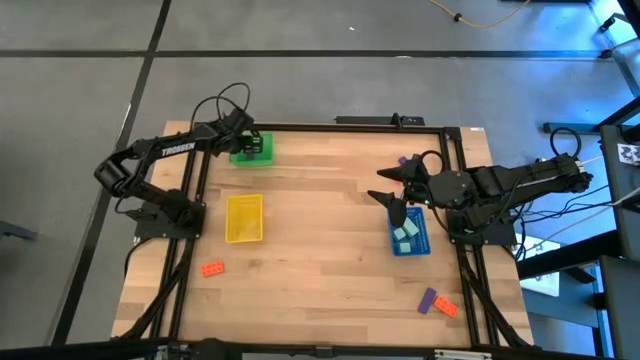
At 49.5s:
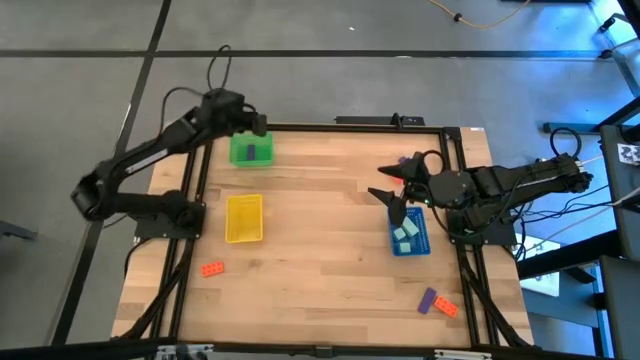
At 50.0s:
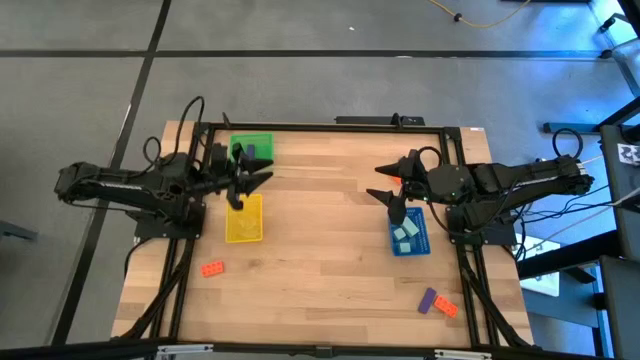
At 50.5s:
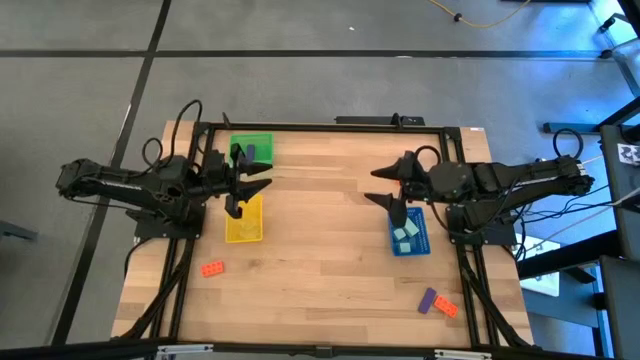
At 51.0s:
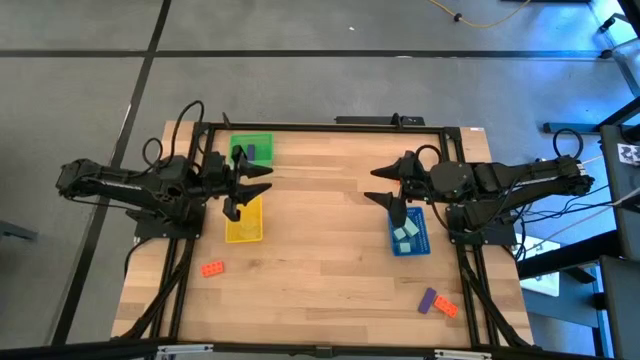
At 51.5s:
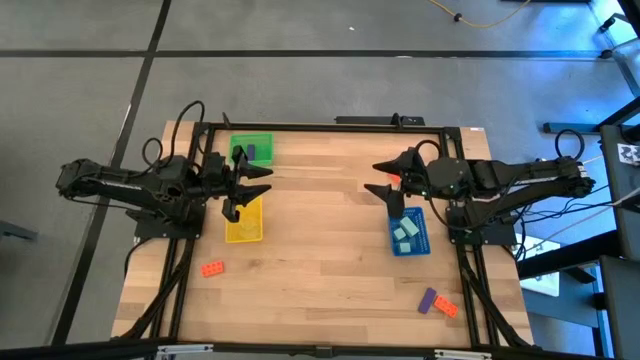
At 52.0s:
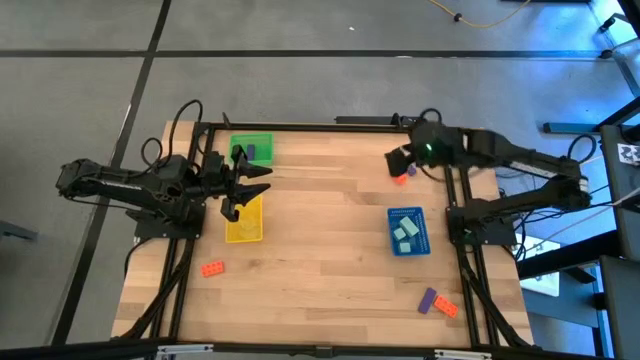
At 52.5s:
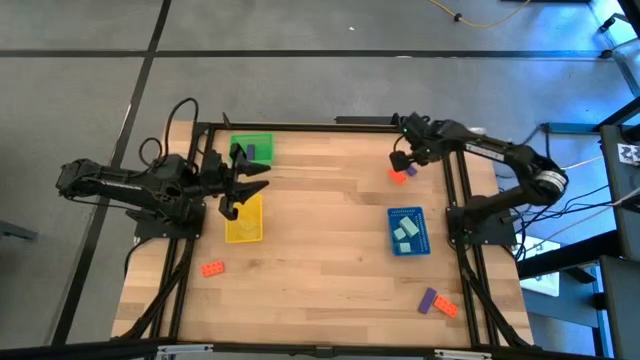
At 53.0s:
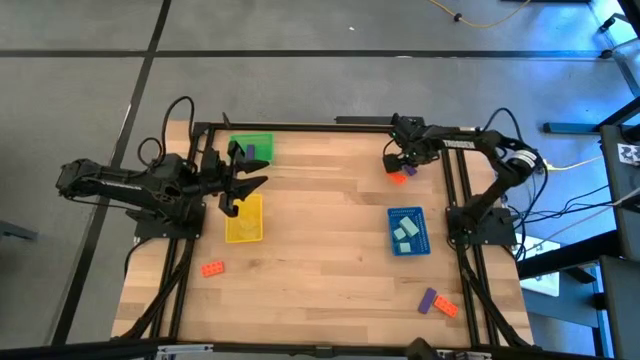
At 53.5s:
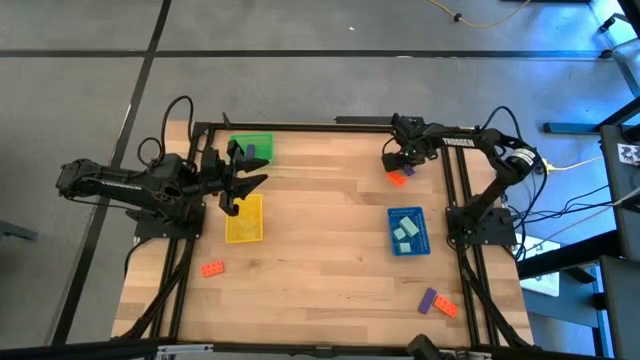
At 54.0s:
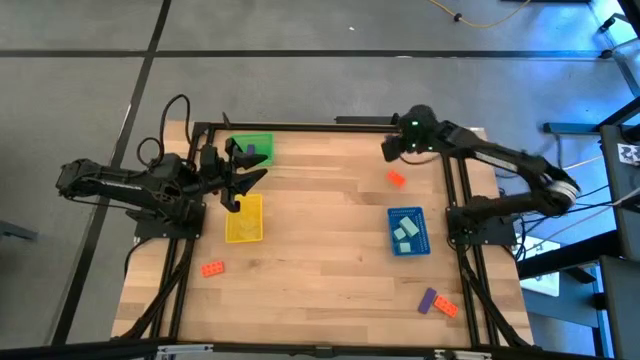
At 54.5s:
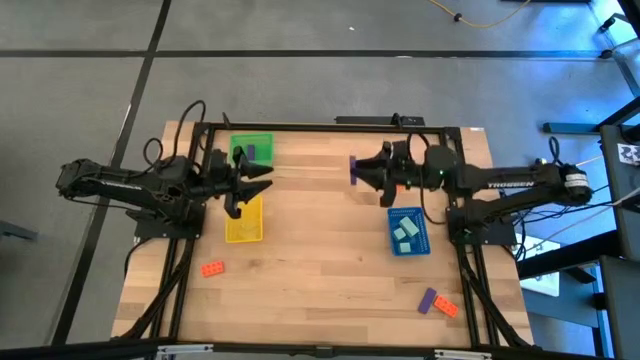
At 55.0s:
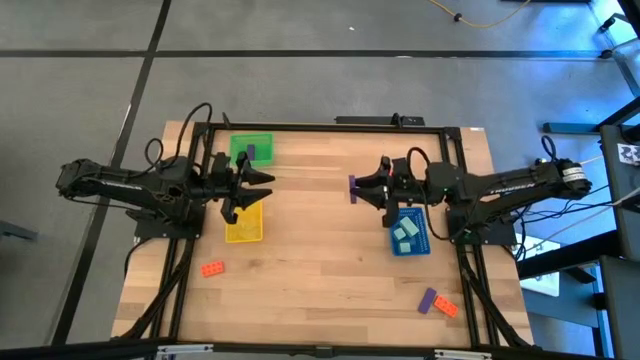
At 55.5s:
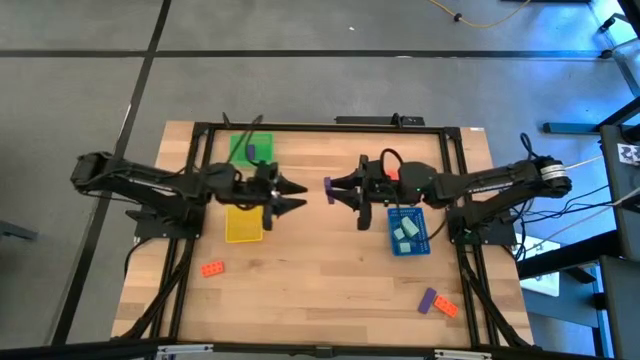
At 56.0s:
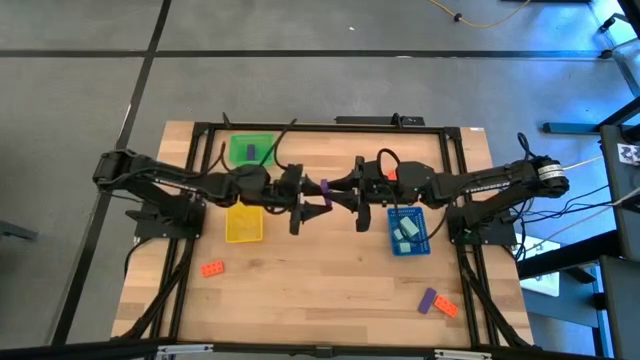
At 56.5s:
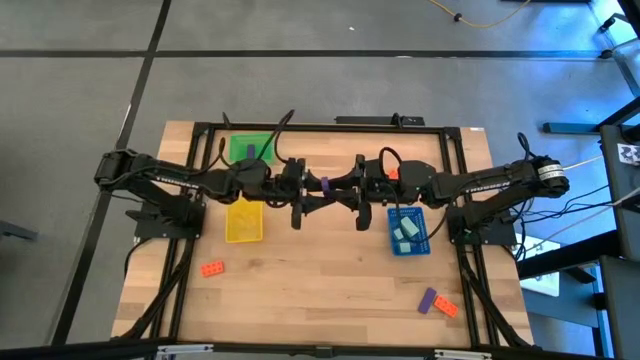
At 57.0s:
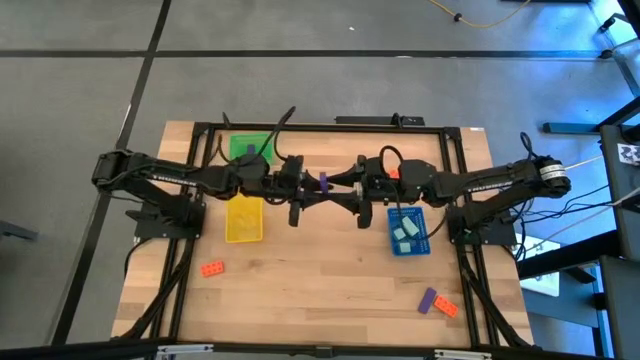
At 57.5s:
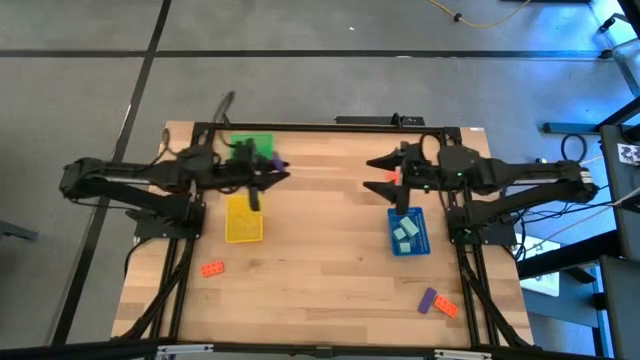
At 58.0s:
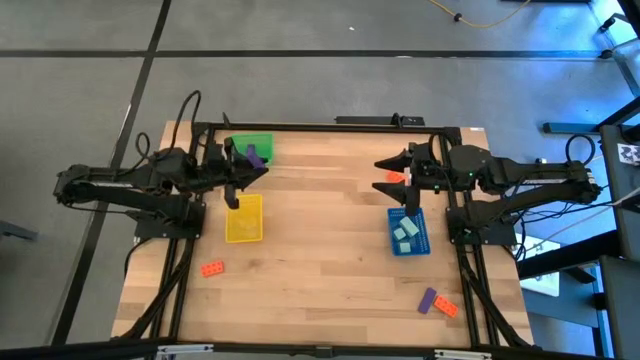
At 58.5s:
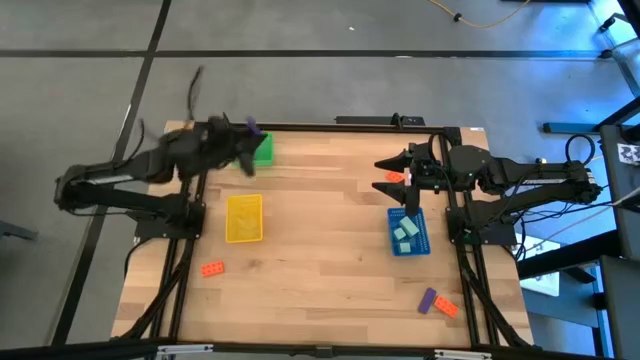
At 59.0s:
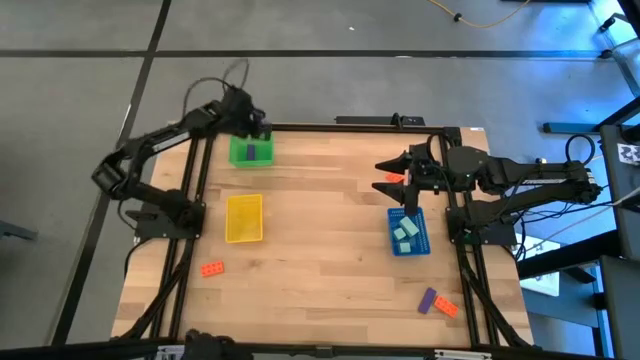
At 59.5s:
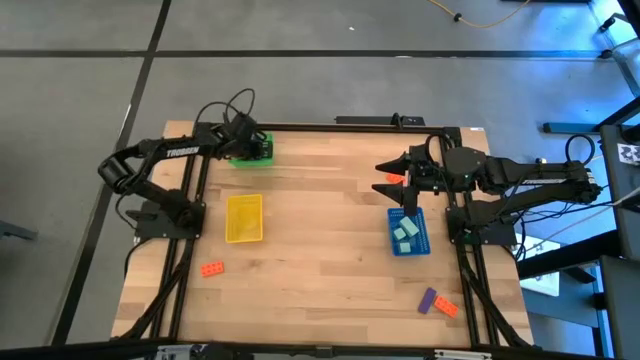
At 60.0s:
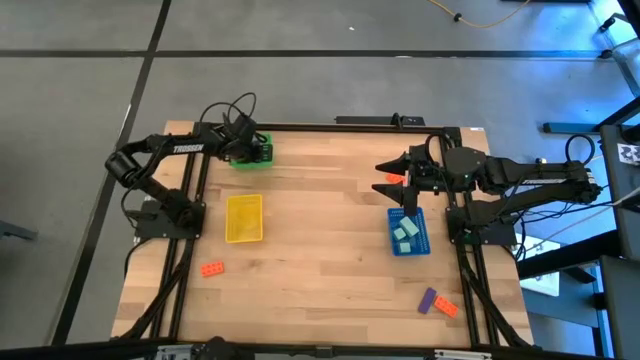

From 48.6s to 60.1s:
Task: Sort & place blocks by color
Put the top violet block into the green bin

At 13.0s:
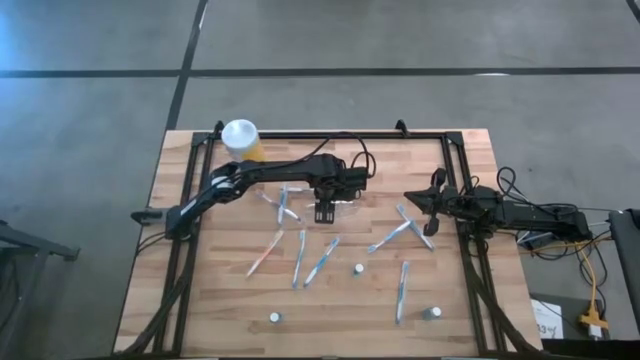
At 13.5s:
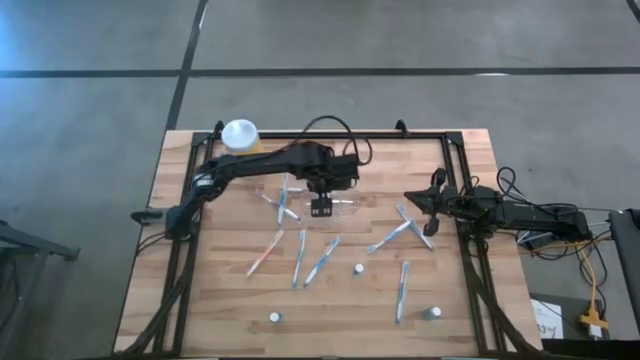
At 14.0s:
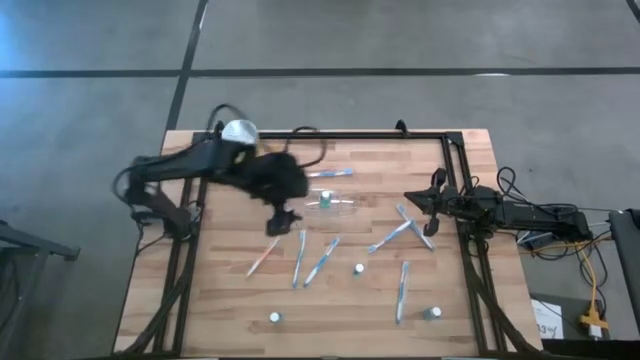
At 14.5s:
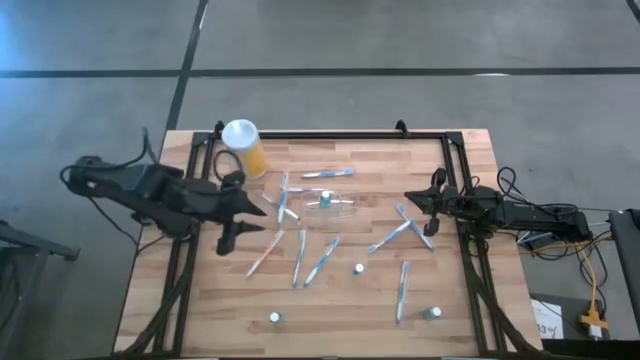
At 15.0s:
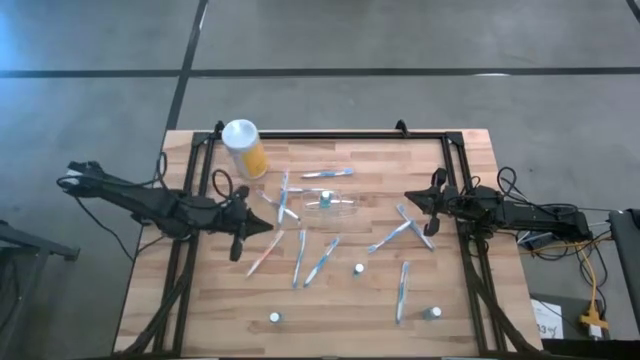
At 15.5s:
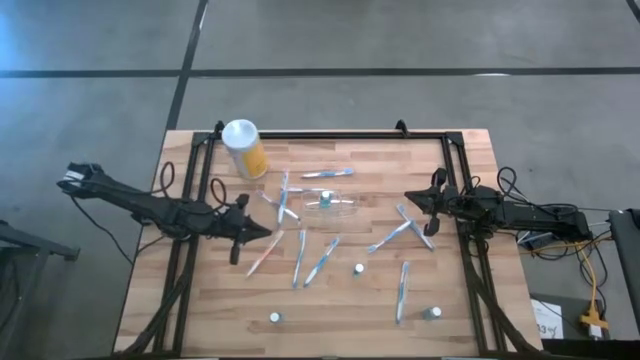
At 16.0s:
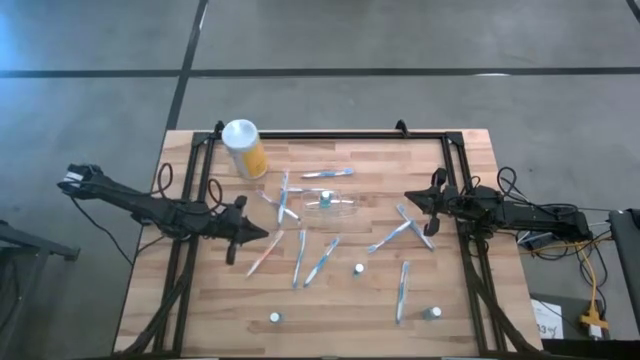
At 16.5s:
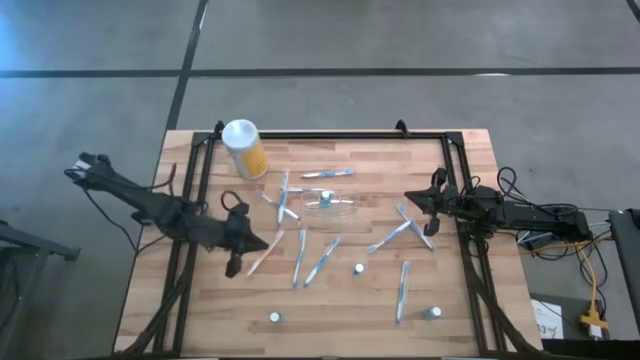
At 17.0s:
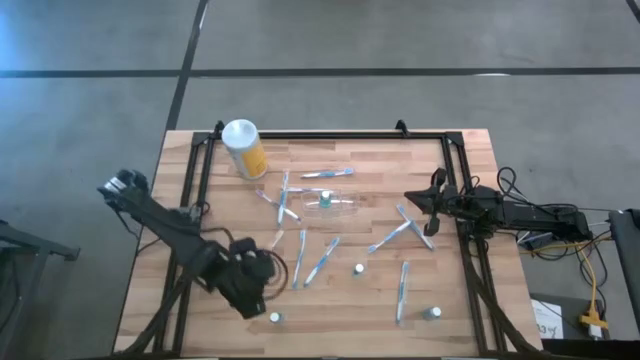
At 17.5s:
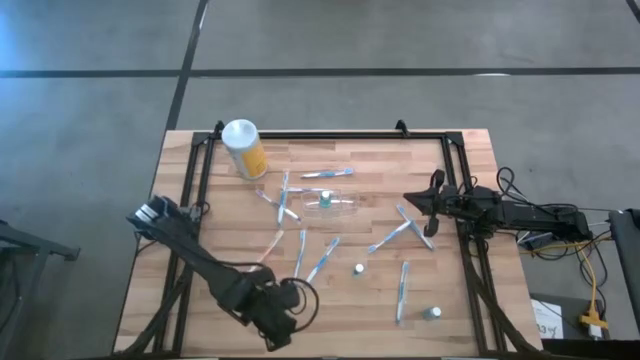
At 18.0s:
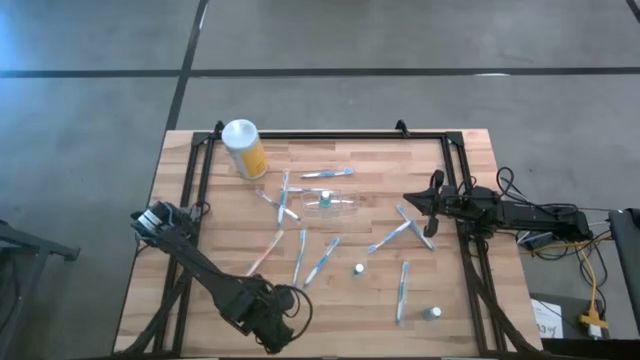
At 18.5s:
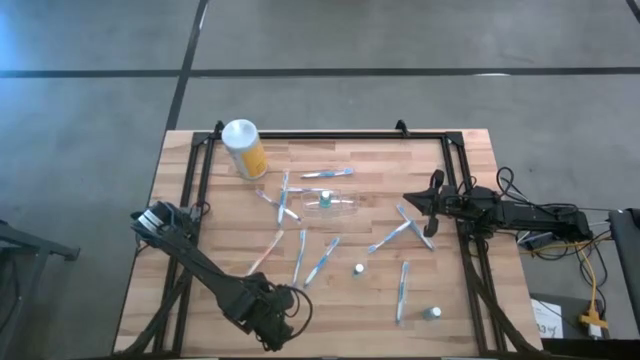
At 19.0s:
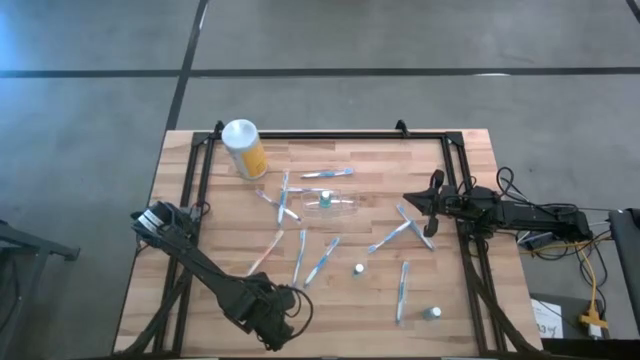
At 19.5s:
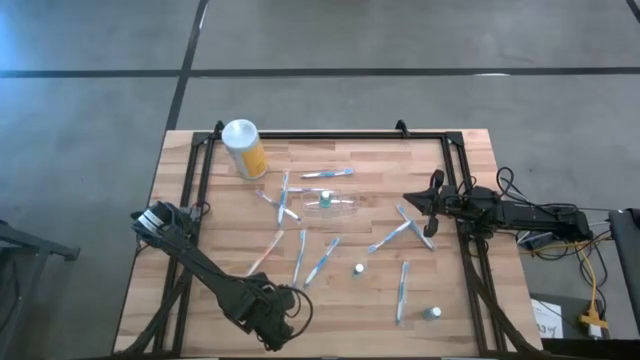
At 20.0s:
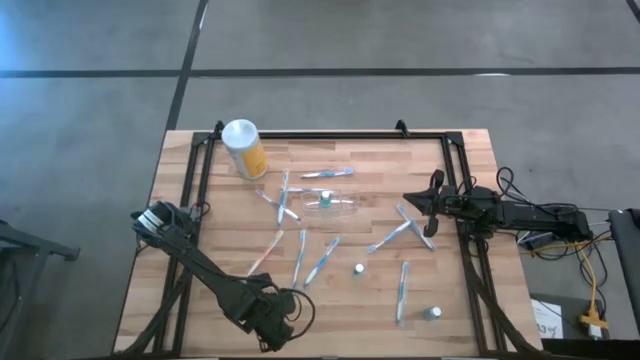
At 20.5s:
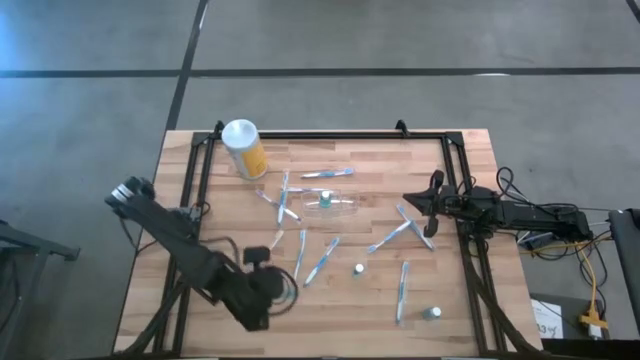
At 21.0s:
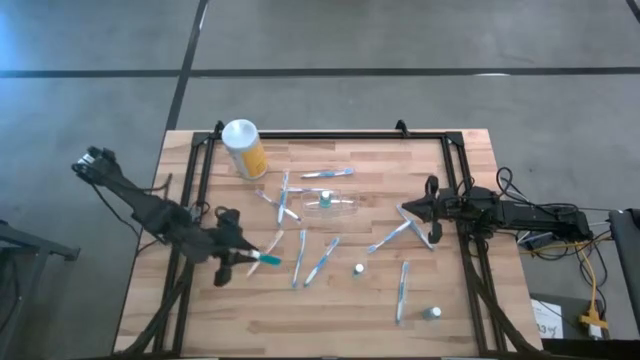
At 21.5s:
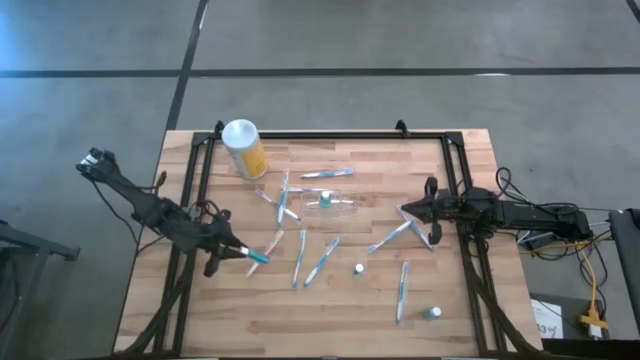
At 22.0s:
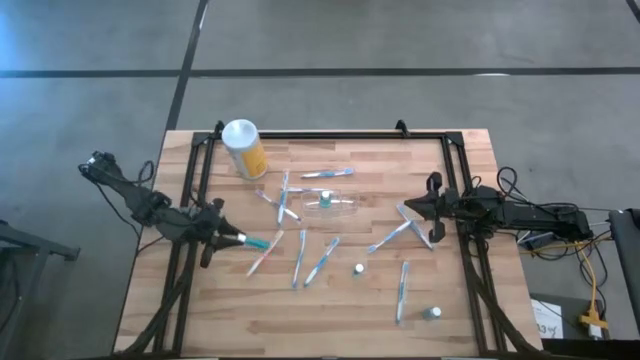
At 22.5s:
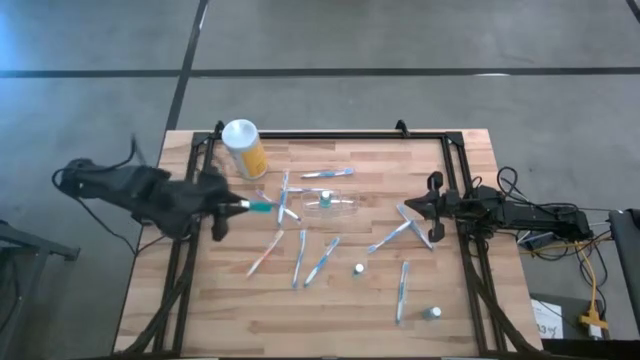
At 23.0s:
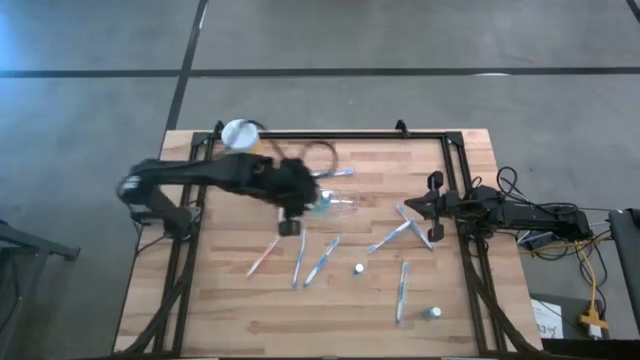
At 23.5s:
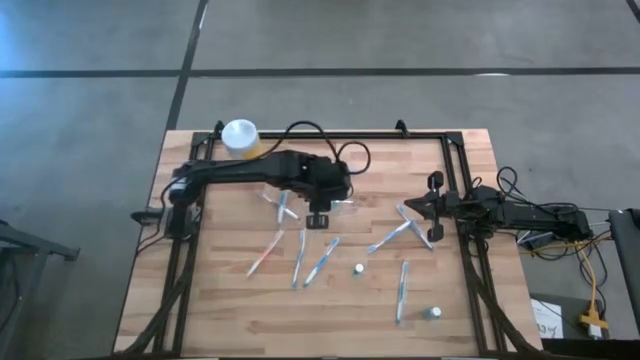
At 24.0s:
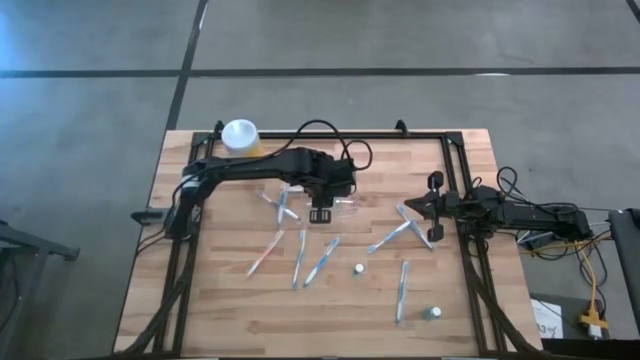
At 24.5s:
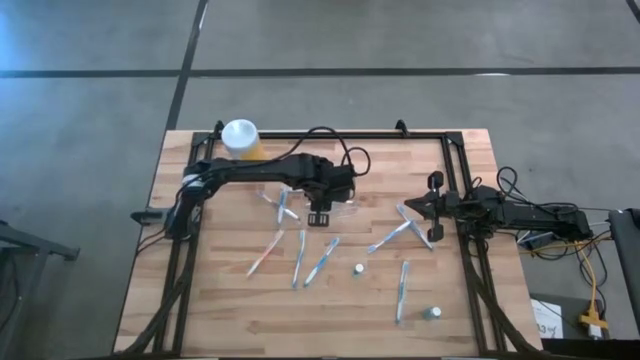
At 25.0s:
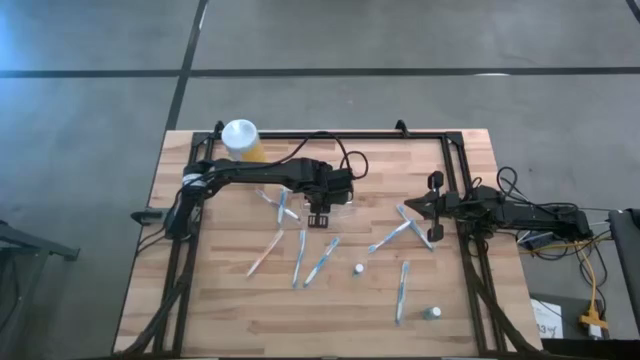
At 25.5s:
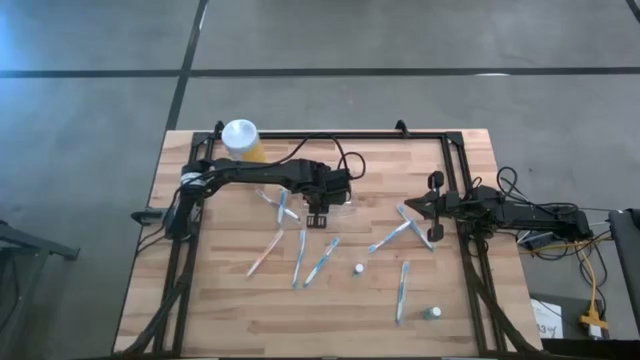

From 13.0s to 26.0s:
Task: Pick & Place toothbrushing station
Put the bottom left mouthwash into the middle section of the transparent organizer
